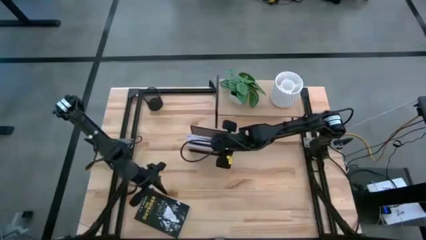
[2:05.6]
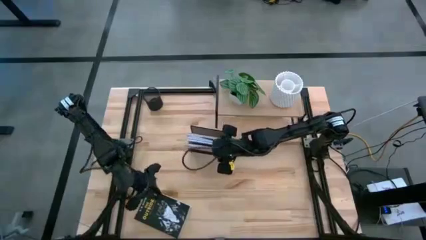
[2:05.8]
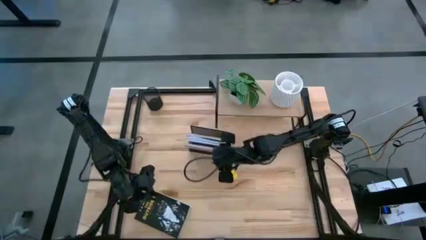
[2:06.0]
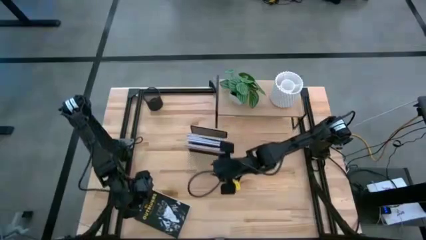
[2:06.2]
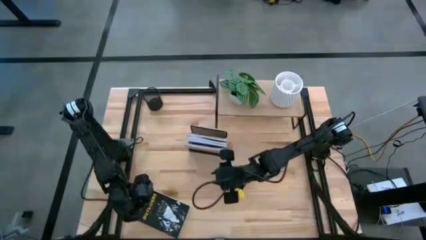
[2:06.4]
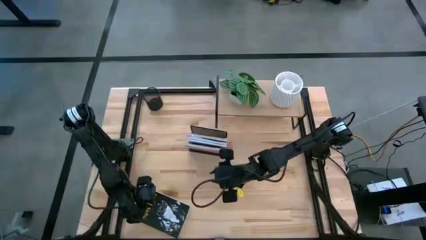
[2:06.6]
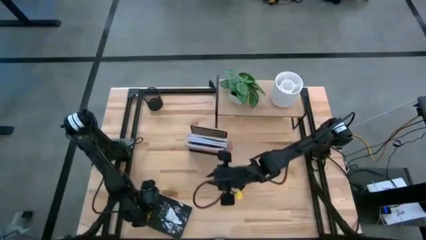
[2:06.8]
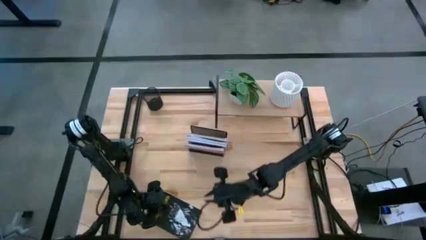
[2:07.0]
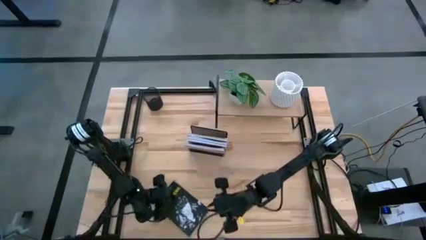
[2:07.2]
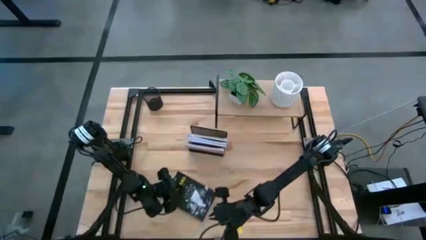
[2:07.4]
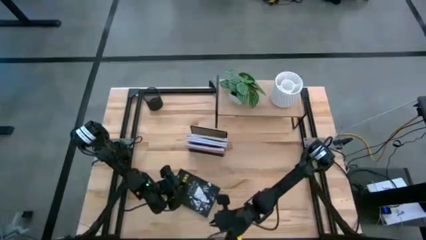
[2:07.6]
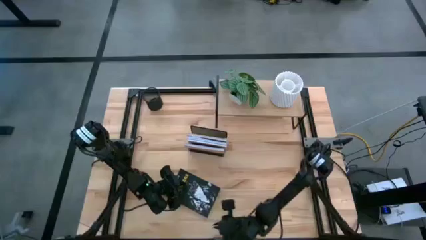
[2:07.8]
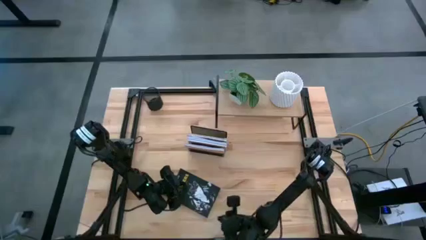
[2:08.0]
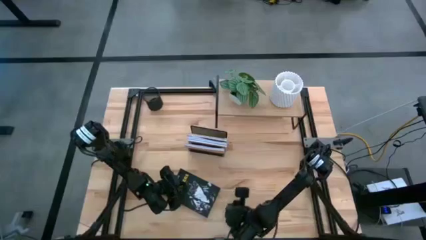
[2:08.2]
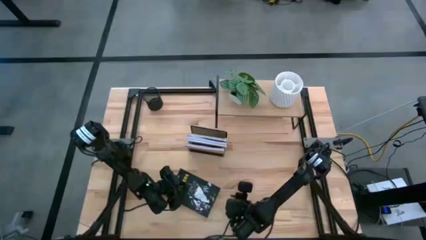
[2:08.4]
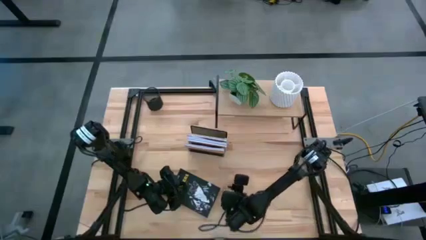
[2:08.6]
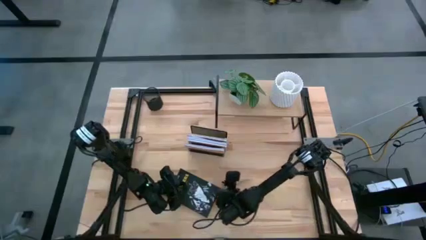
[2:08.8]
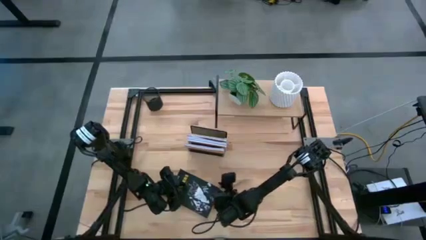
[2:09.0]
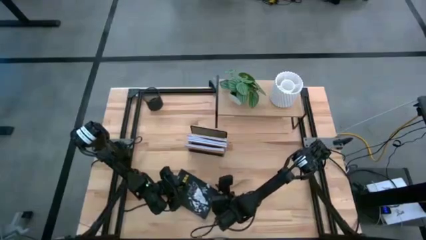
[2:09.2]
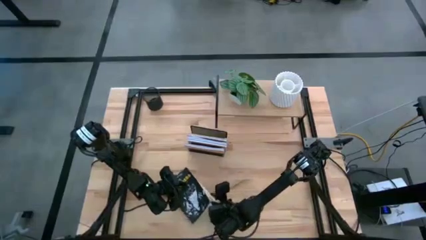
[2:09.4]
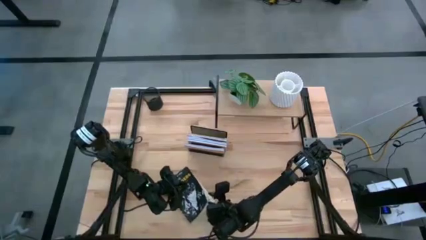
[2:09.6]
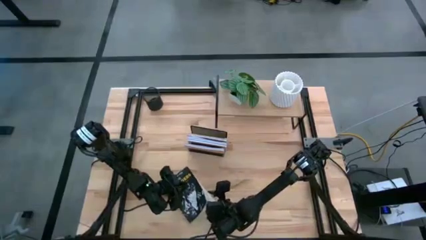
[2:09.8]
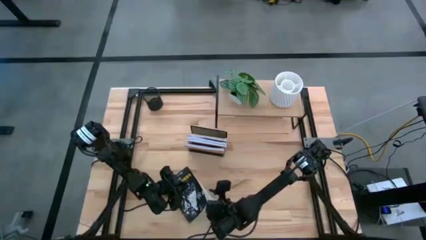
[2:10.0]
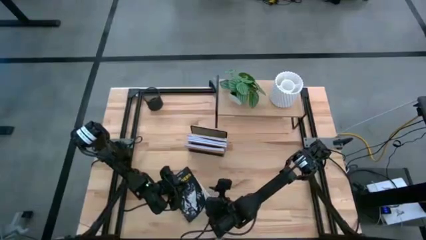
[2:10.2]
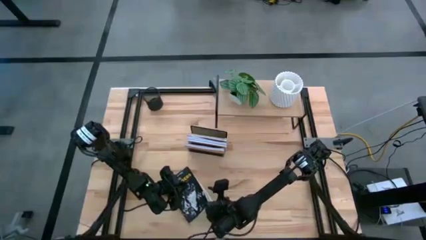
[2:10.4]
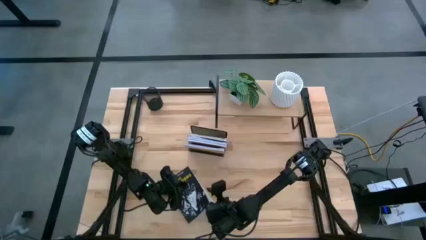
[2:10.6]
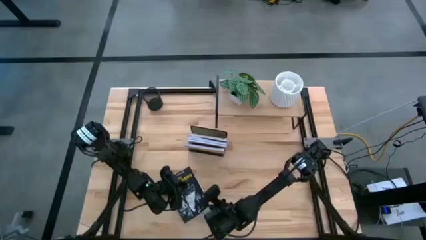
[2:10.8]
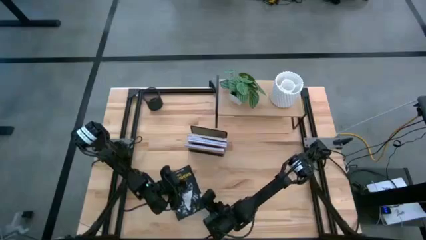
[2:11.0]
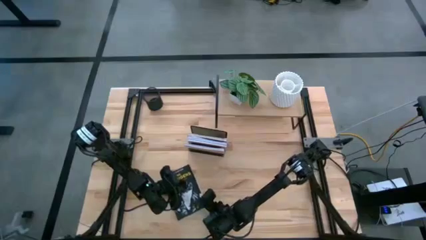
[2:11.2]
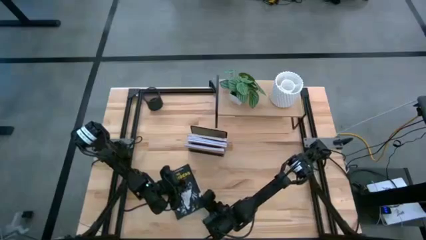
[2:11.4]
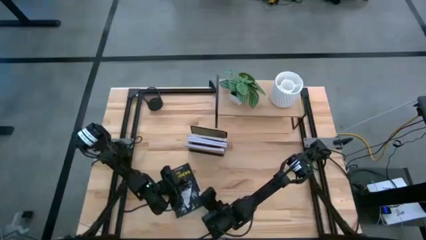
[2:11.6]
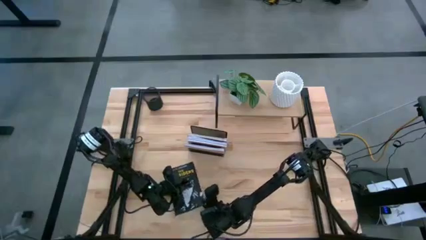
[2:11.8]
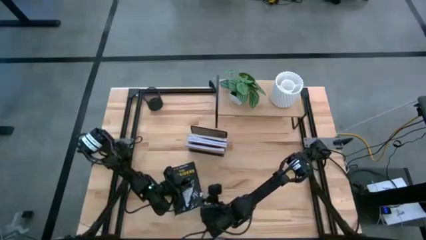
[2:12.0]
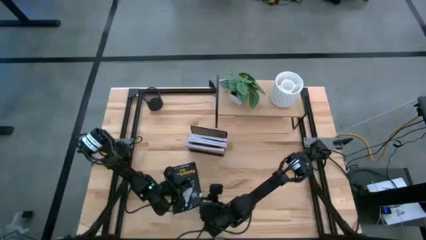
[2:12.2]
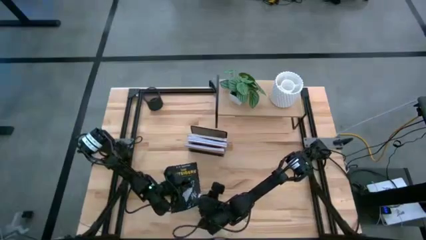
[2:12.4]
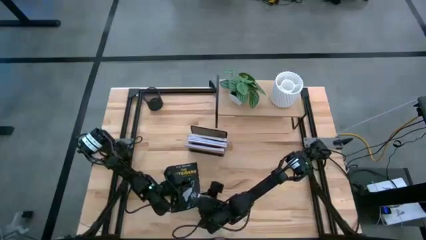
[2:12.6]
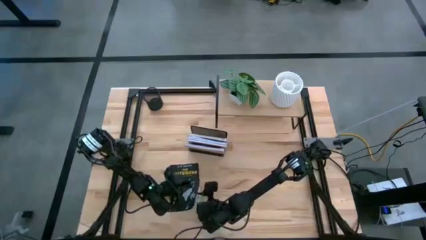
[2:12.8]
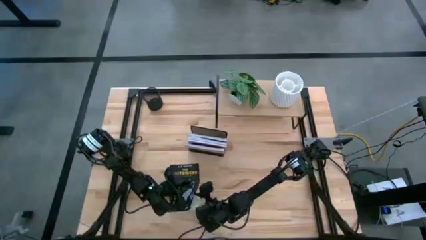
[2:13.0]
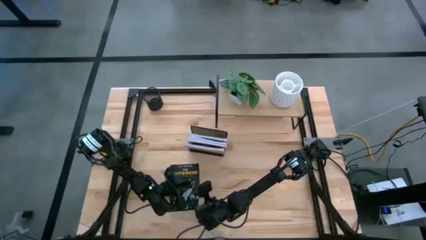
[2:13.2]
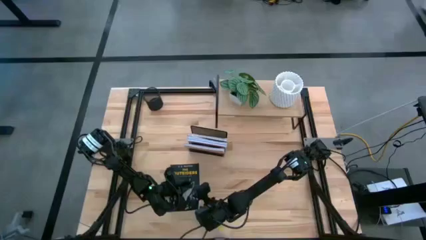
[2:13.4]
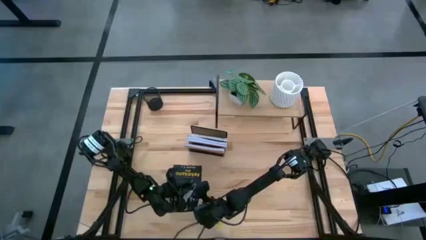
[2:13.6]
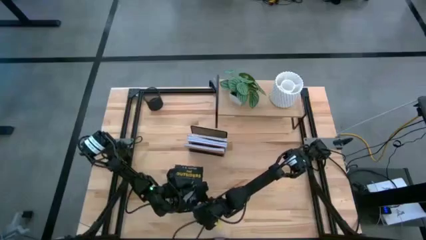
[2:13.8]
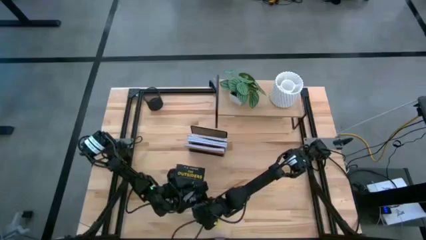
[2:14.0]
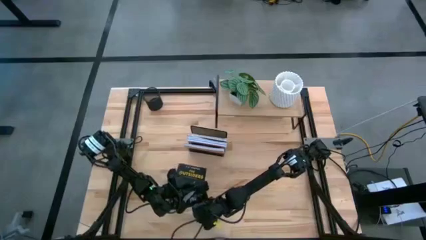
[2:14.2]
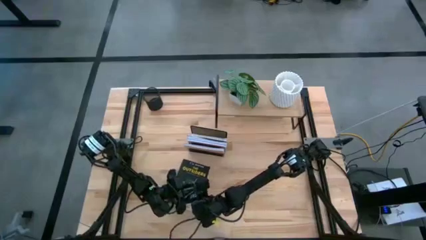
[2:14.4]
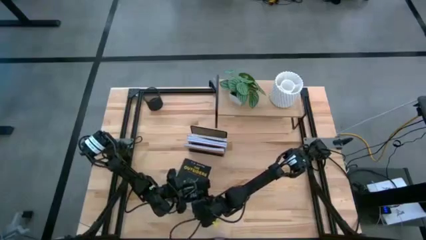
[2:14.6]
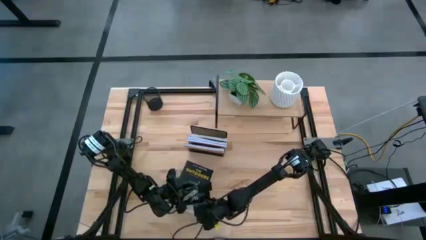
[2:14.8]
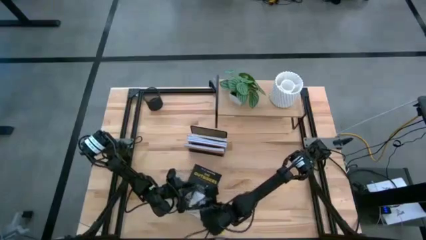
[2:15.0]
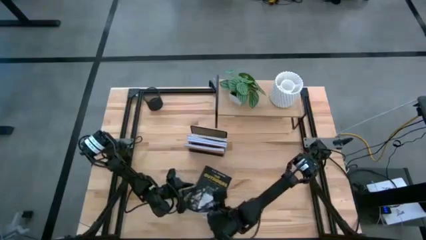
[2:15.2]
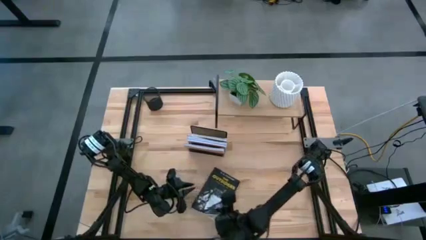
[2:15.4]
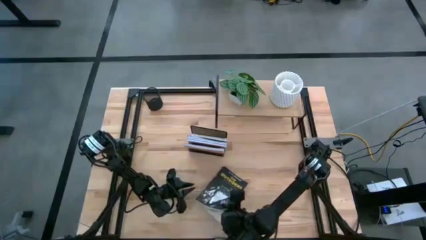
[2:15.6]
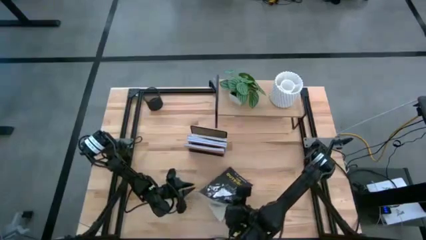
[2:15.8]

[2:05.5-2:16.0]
Task: Stock shelves
Put the black book into the black mesh bookshelf
